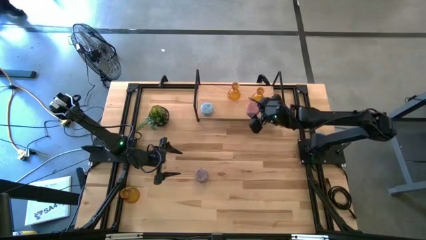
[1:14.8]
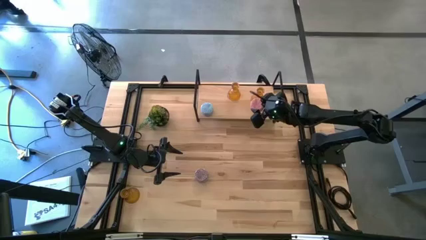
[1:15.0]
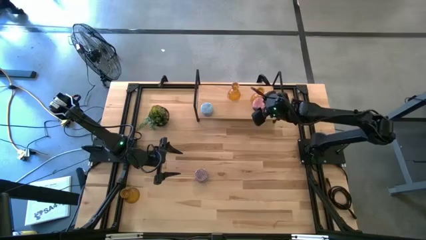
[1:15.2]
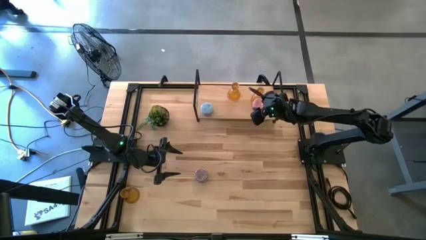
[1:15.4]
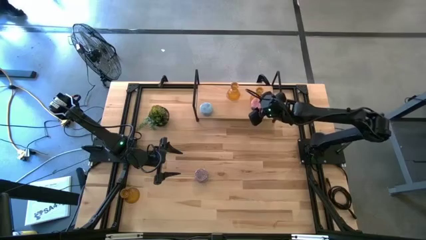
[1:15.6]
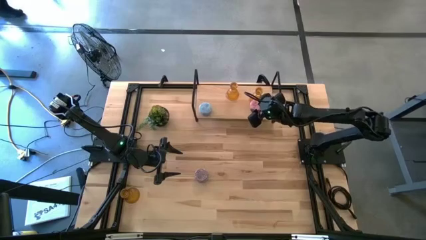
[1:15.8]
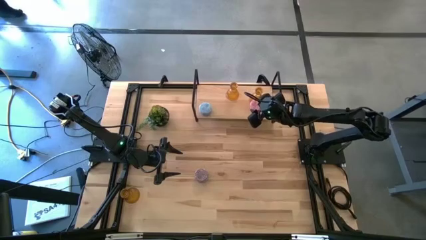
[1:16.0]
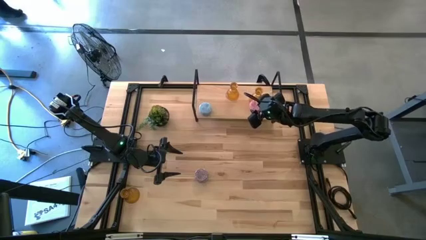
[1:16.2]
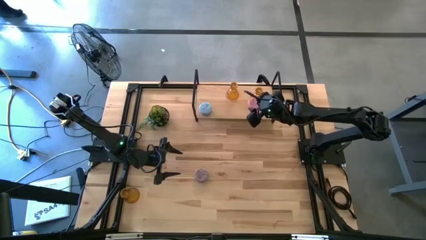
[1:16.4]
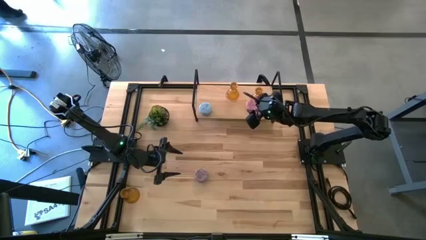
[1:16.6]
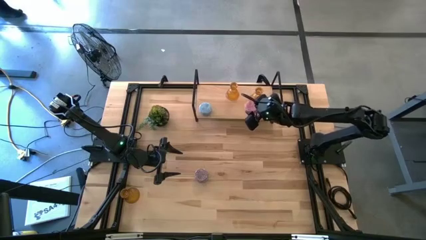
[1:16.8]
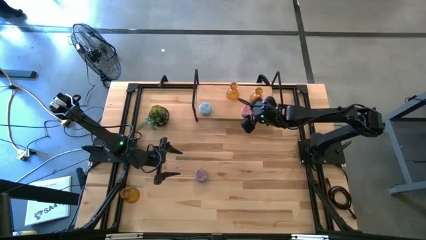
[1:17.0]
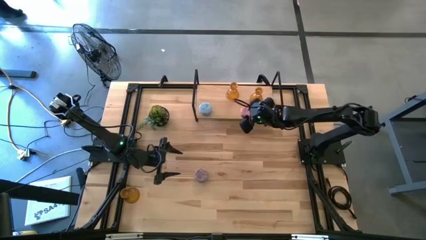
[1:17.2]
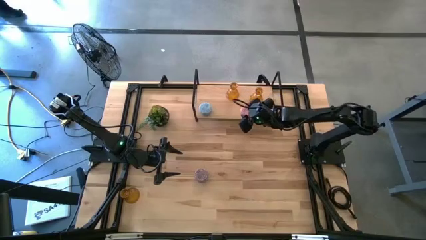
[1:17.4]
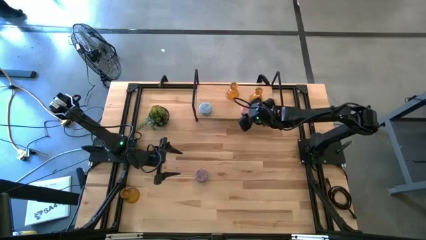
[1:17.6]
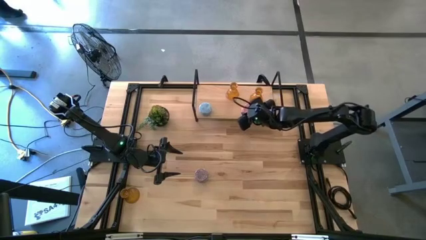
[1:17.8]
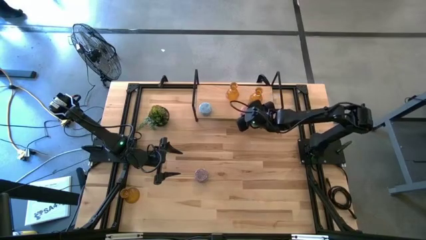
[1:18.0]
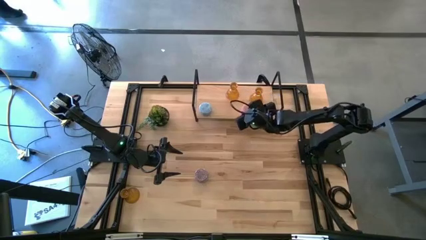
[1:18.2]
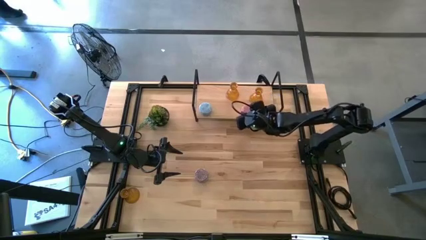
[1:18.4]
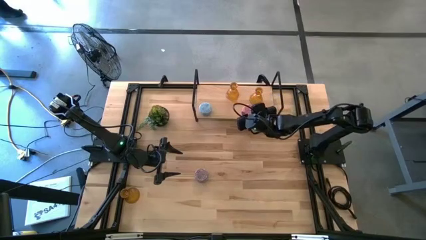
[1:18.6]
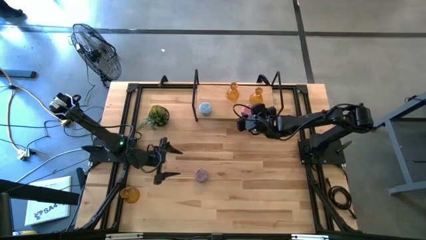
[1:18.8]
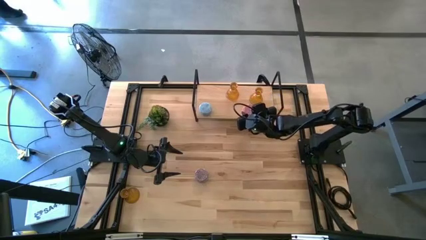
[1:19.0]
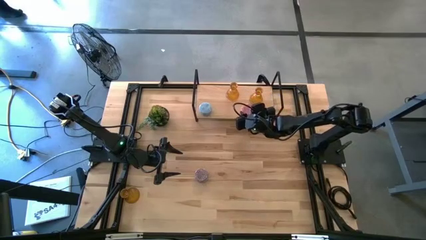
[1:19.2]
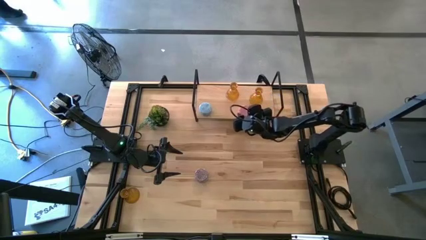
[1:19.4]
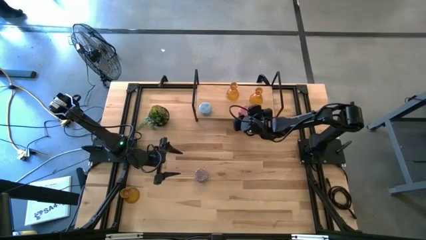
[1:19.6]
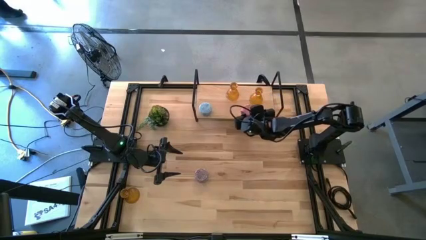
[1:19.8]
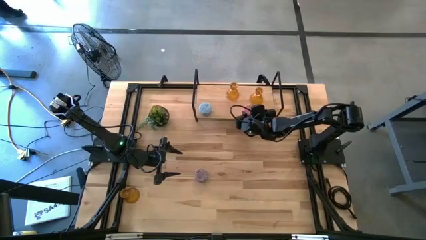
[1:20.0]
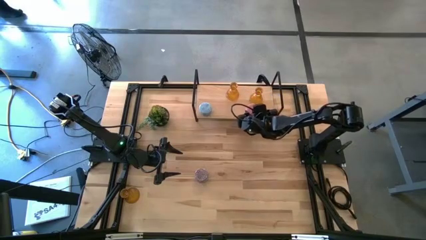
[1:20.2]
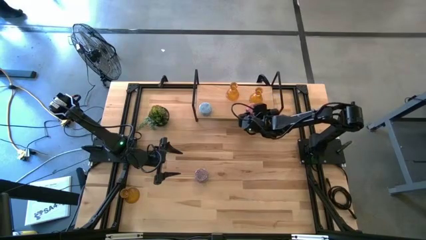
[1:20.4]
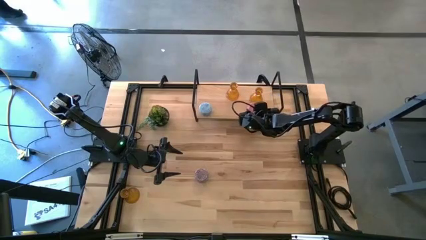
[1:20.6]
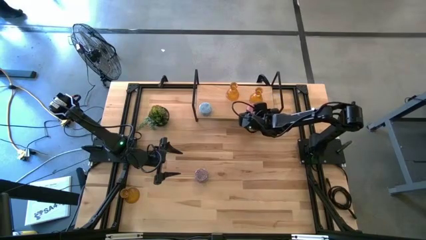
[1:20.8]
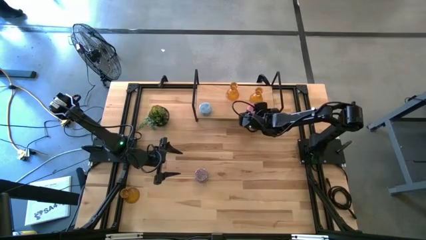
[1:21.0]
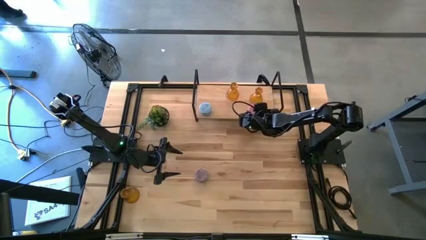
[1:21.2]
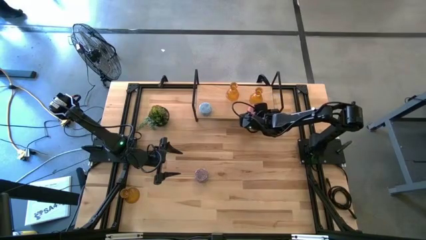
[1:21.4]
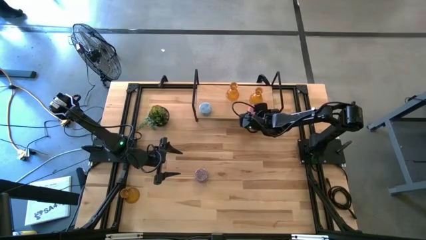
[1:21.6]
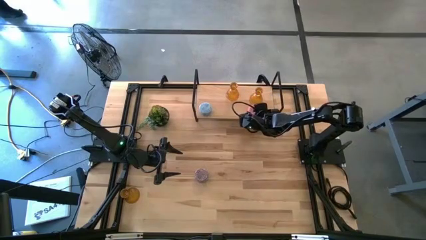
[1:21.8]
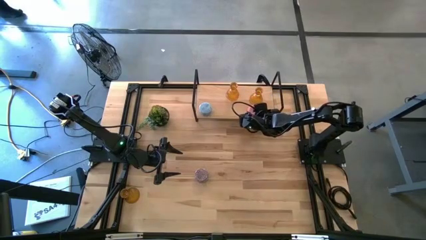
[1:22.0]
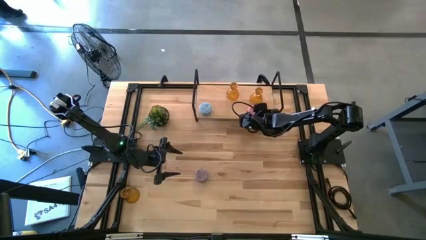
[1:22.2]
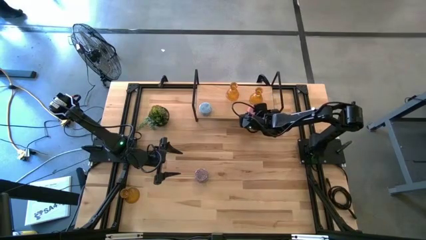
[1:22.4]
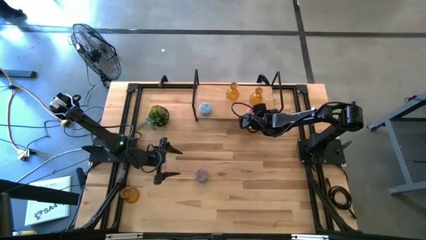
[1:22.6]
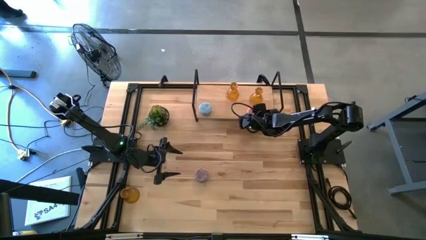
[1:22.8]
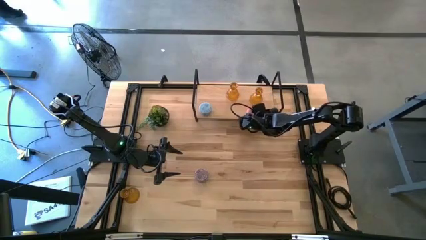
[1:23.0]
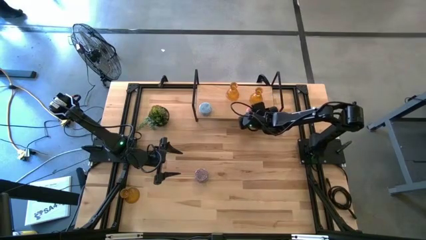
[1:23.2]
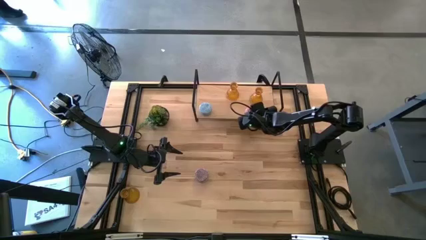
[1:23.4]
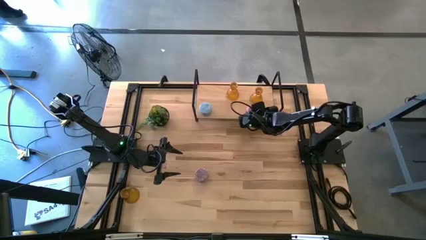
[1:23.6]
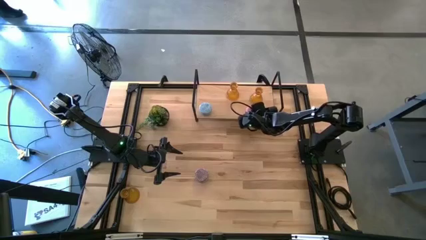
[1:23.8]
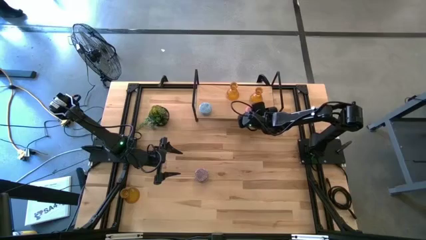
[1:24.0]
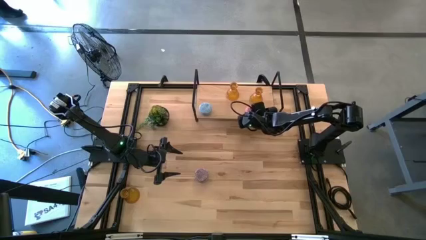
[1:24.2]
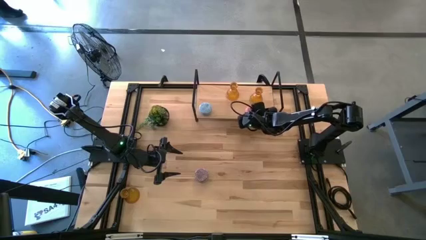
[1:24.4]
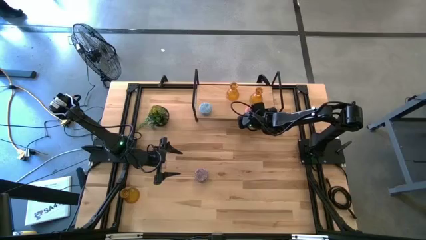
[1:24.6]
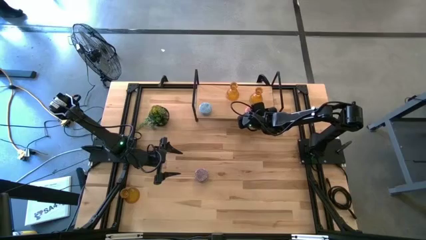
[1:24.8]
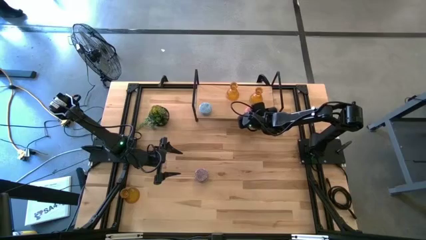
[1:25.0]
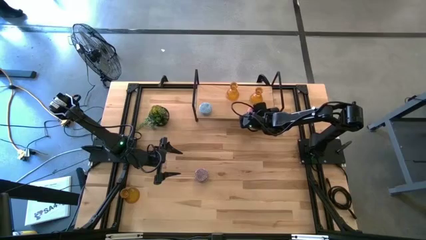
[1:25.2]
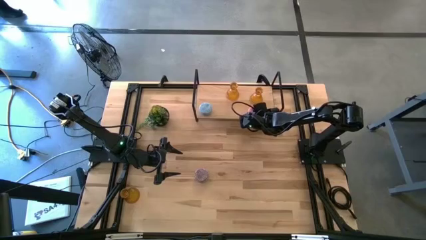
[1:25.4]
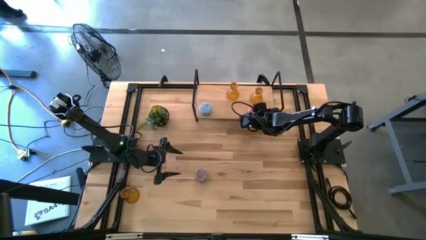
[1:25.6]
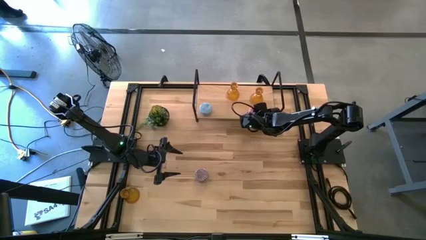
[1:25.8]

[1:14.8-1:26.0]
Task: Pick & Place candle stick holders
Put the pink scented candle on the shelf aligned with the blue scented candle

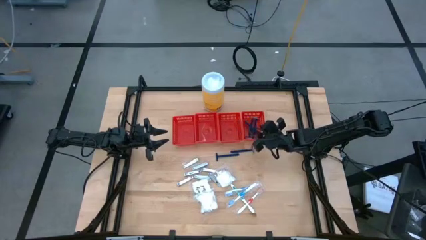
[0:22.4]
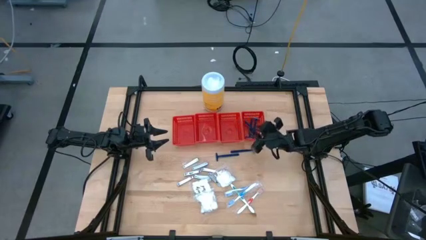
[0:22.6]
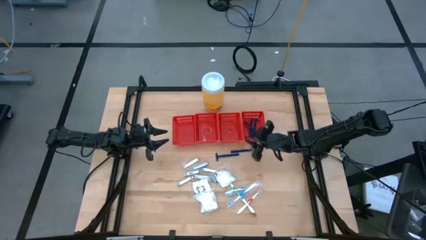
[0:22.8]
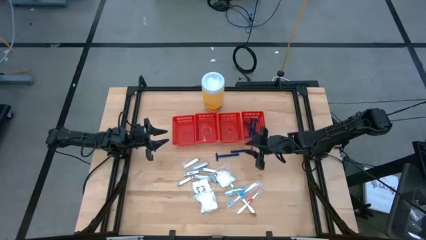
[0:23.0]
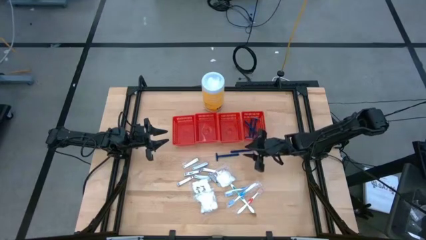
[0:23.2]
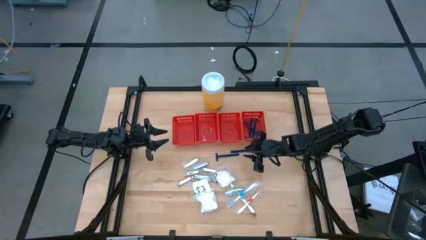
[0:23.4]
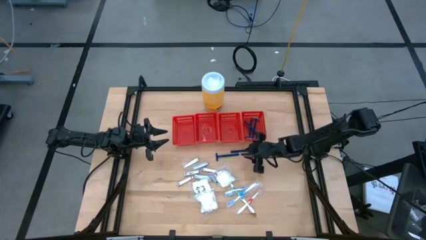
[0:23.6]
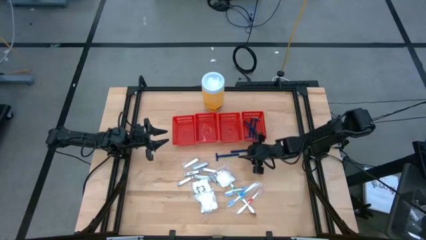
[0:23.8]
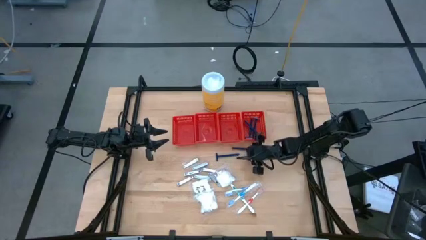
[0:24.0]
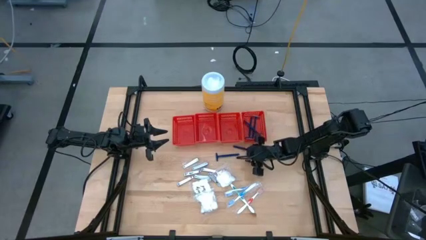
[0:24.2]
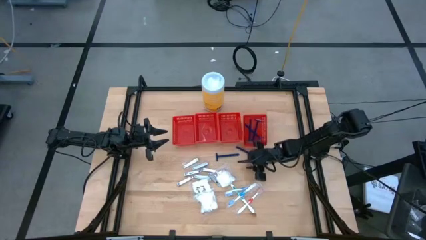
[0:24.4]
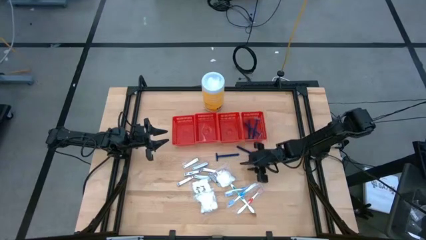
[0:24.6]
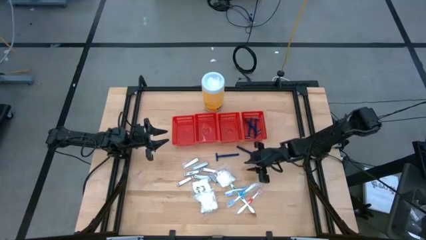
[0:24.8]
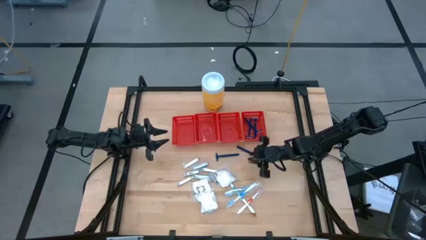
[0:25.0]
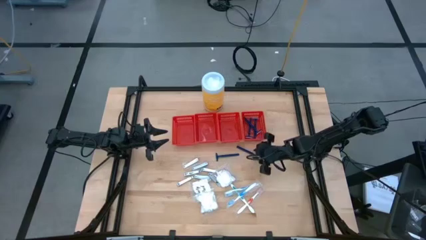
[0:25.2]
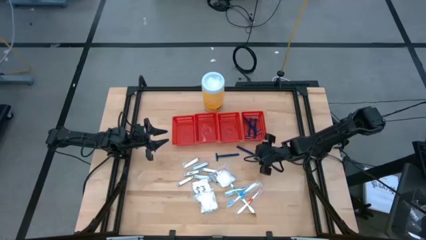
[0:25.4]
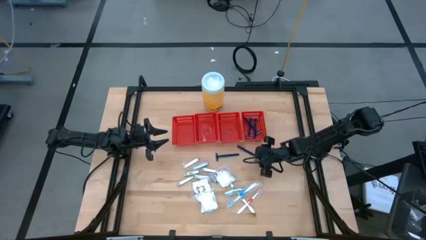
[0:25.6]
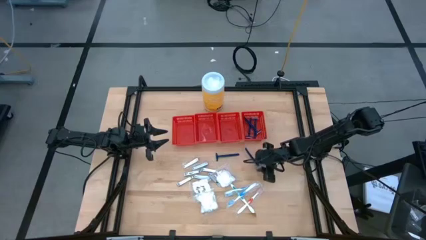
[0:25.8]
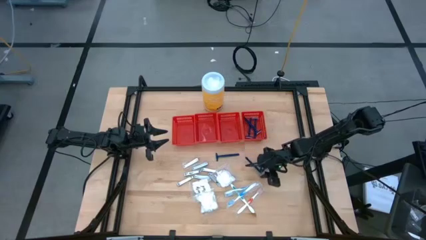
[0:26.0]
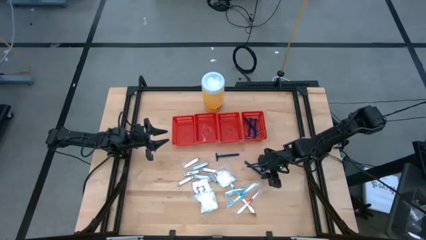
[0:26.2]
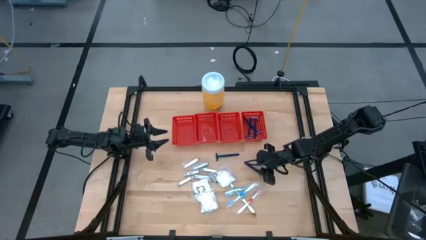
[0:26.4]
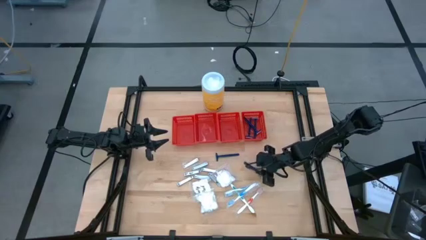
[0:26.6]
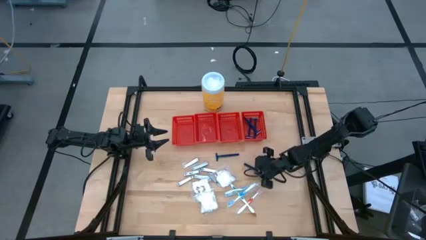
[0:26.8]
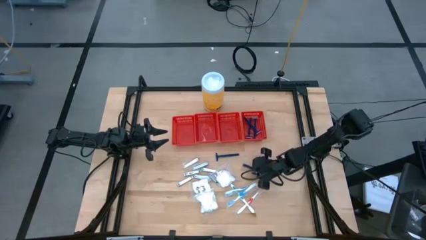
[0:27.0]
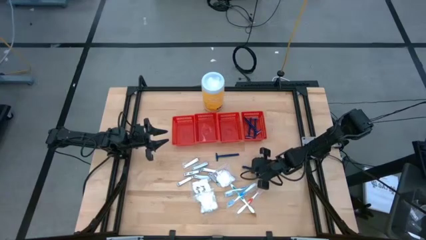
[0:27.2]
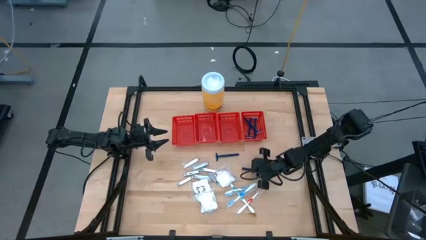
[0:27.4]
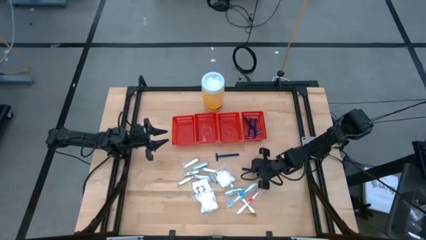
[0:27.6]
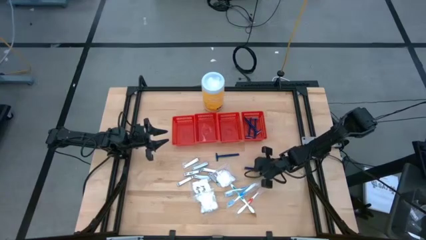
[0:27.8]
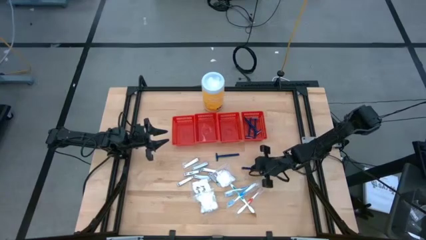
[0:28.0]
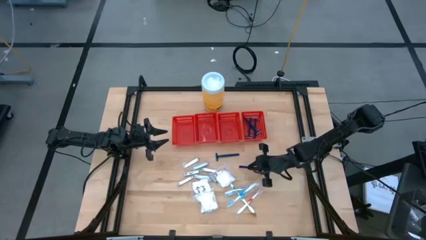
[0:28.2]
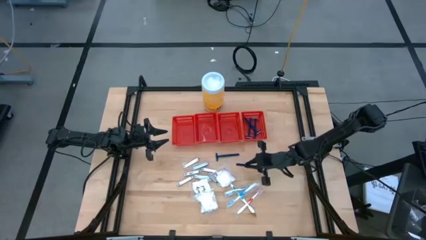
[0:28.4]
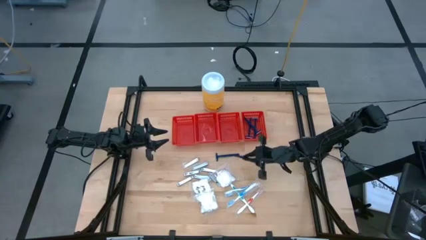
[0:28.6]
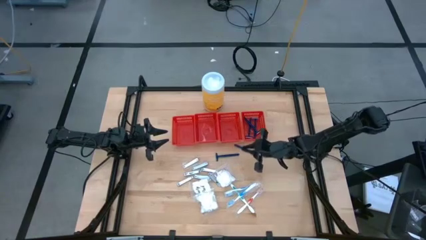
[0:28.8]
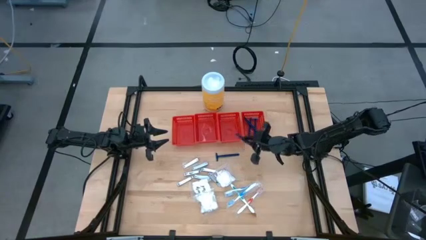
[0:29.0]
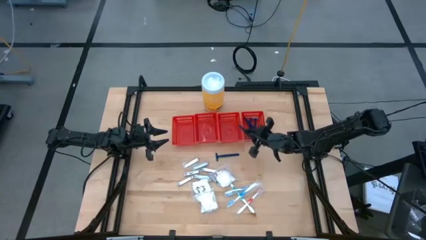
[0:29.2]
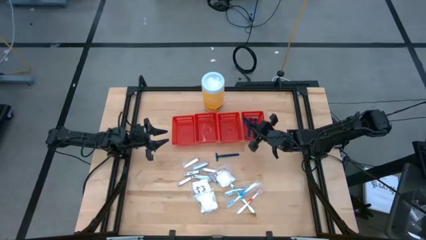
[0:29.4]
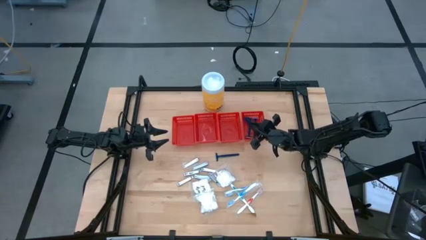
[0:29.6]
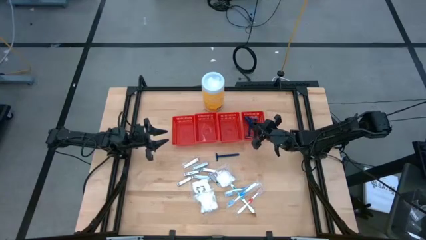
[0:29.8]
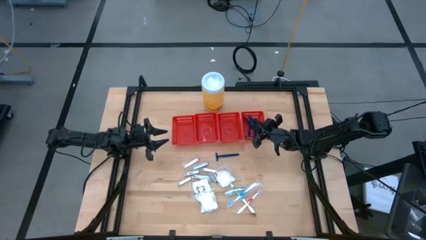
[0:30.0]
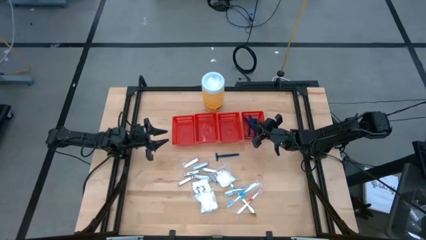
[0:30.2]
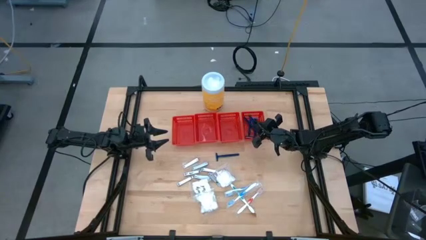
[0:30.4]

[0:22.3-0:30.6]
Task: Pick & Place Travel size toiletries
Put the blue razor into the right red basket
